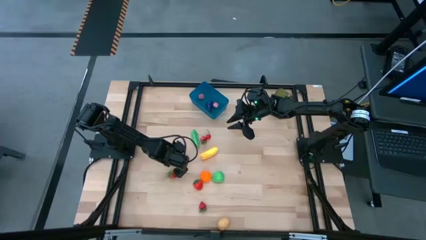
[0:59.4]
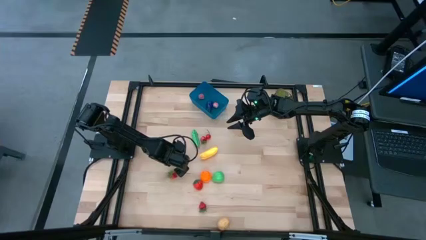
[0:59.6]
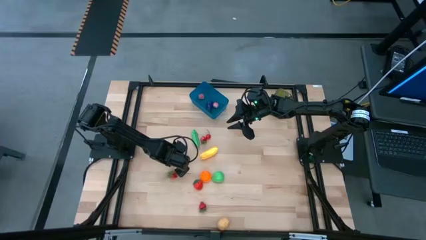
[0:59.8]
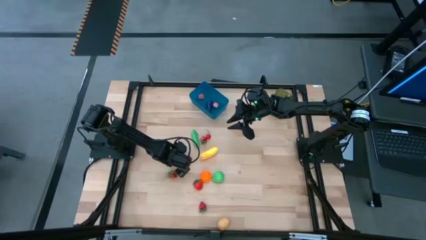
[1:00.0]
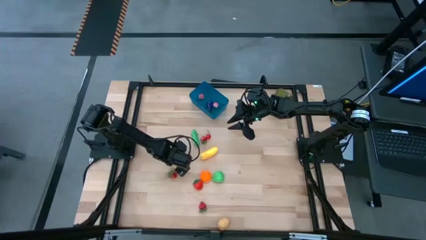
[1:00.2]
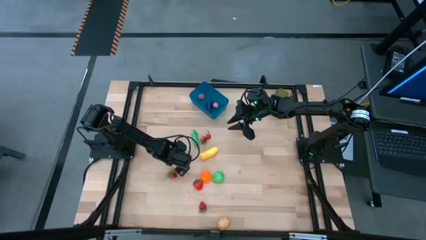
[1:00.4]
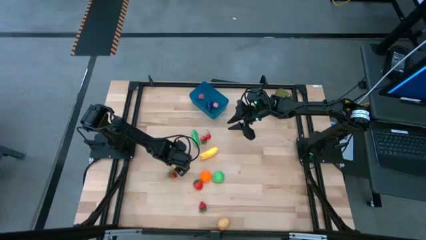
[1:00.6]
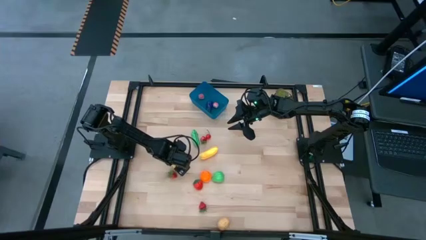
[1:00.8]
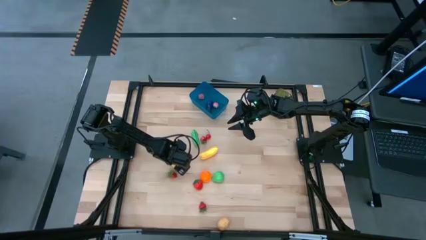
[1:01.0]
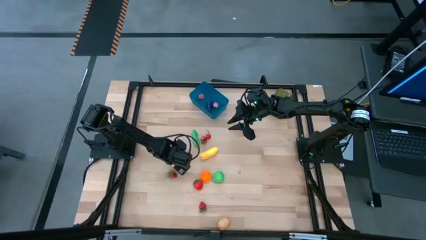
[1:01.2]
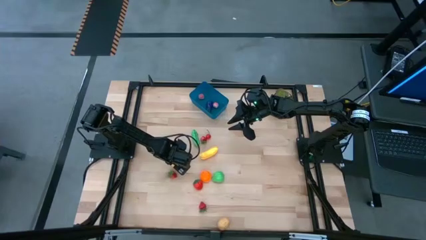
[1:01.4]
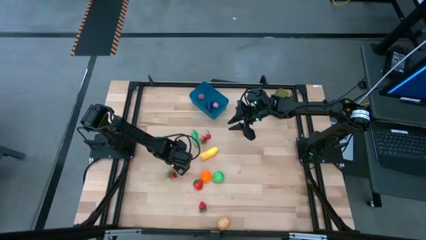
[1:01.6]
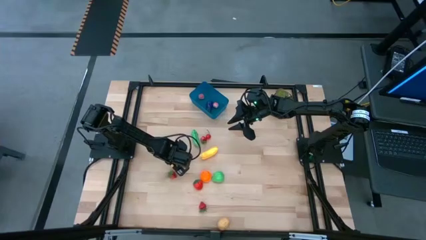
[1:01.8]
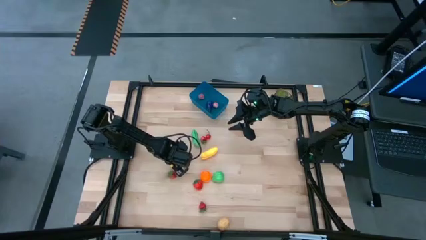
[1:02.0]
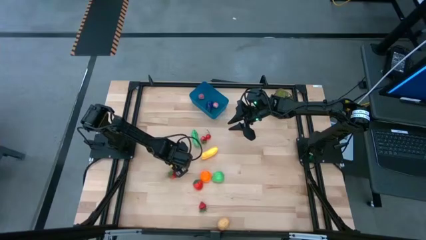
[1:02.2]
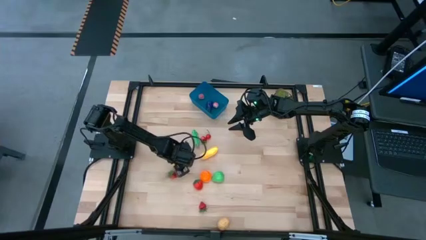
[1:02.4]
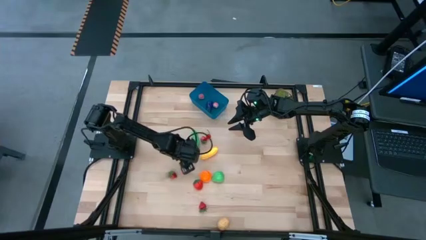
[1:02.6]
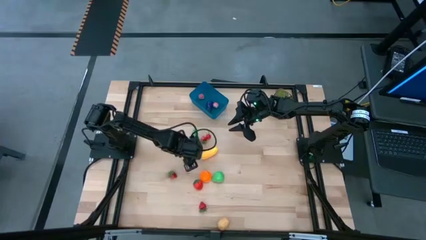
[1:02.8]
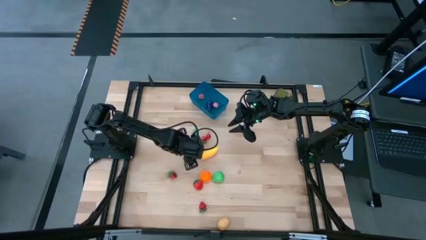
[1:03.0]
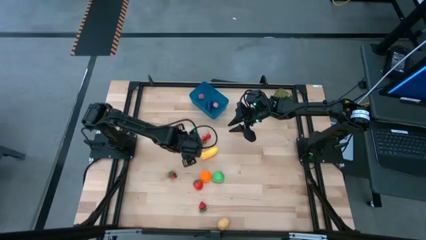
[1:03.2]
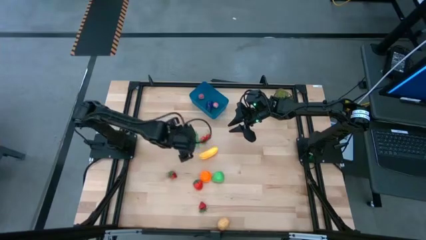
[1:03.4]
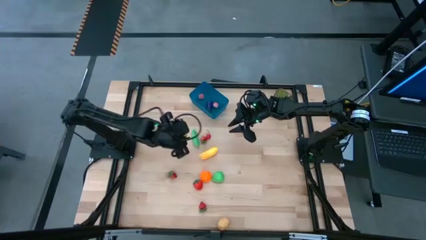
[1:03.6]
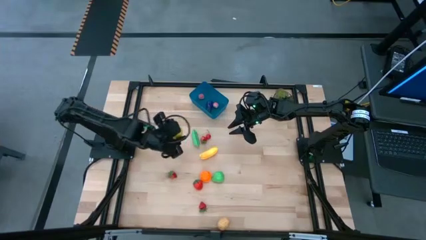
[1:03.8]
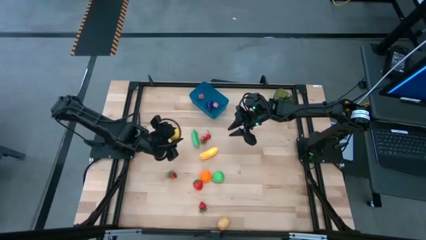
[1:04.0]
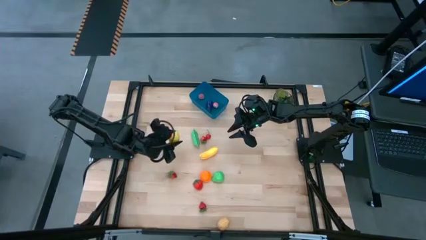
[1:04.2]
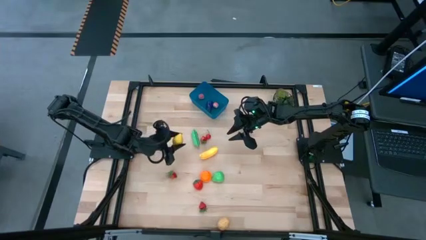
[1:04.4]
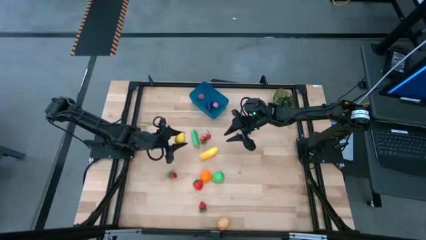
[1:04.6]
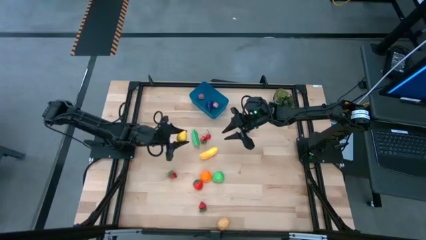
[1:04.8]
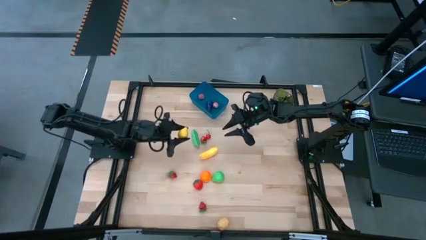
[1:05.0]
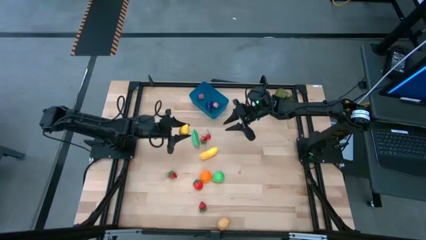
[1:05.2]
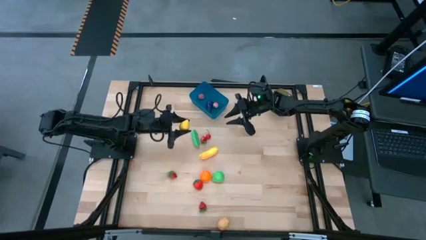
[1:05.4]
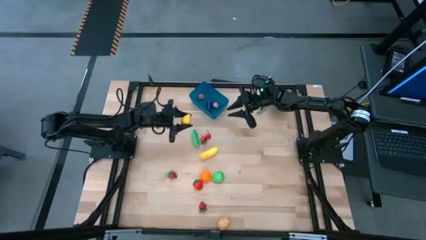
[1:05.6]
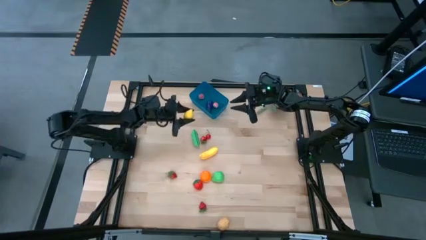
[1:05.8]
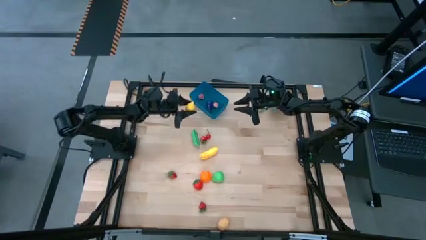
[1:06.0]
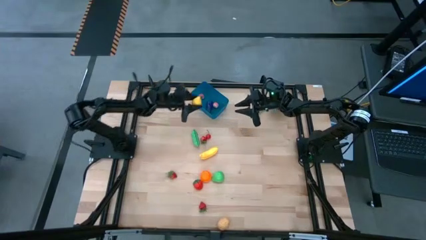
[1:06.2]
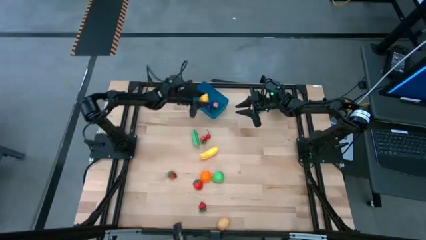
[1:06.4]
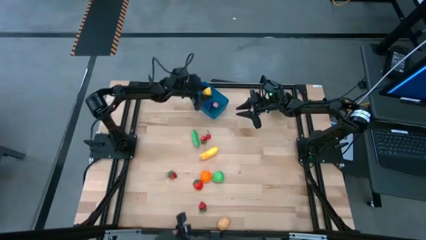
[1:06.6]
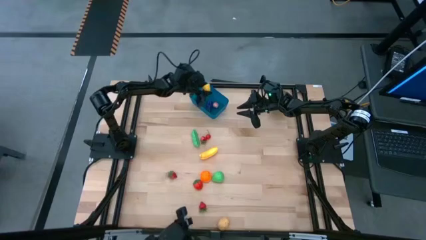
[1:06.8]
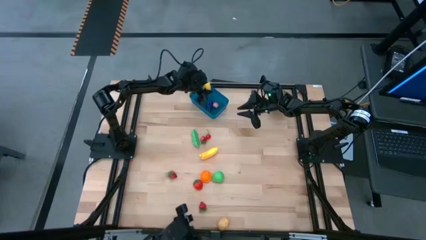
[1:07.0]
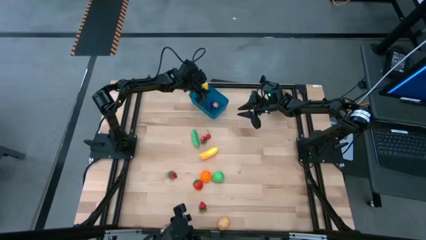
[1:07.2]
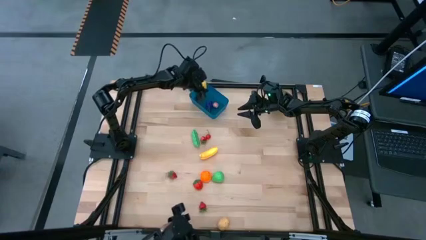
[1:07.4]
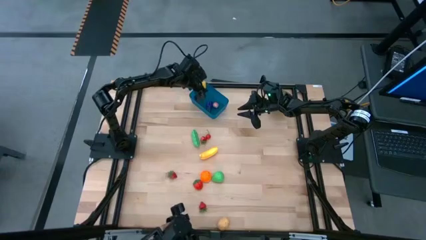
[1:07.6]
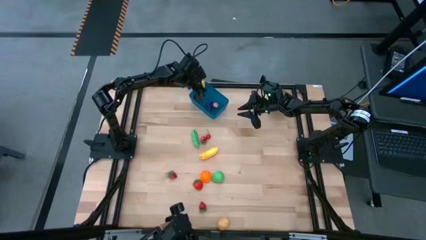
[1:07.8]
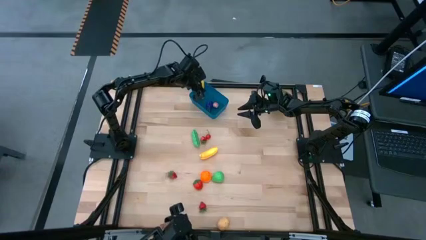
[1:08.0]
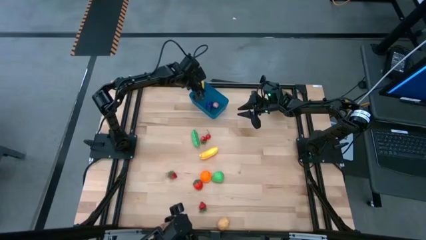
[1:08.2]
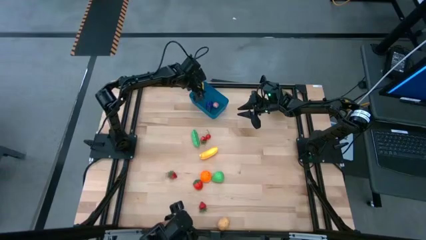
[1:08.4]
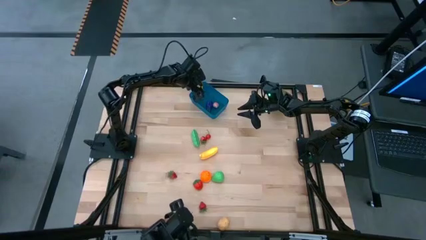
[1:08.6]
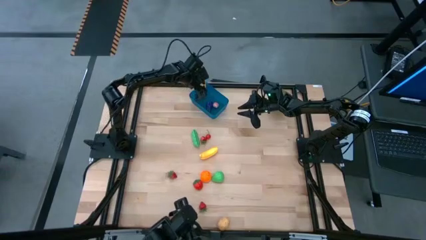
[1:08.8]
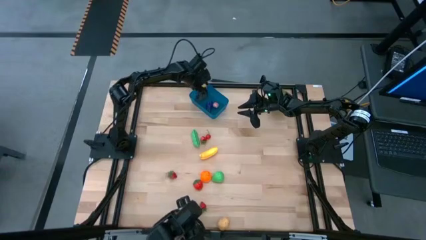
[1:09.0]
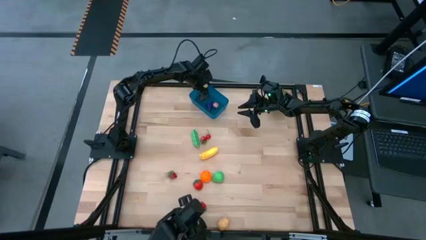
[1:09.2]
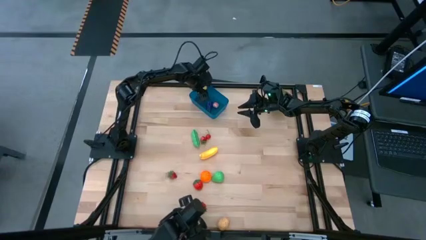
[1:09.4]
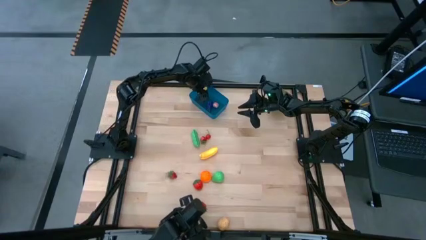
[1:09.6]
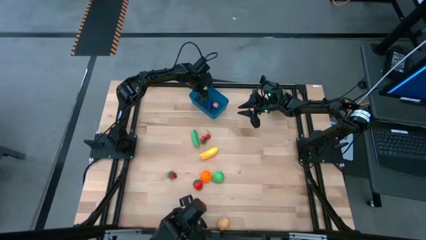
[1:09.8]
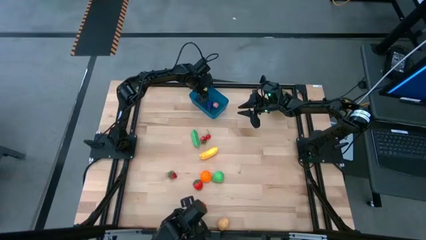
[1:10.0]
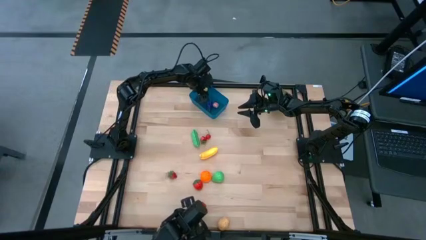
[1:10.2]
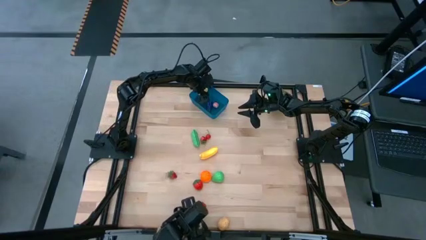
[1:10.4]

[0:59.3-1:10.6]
Task: Pick and placing Produce into tupperware
Put the yellow lemon into the blue bin

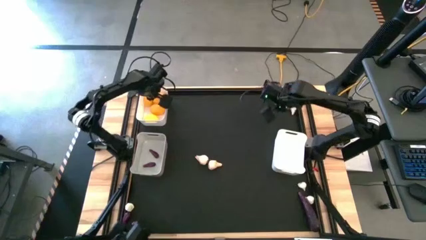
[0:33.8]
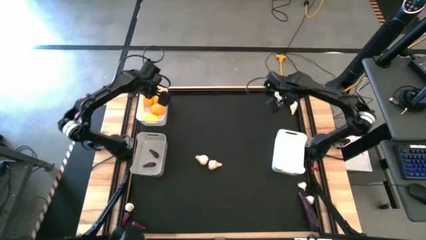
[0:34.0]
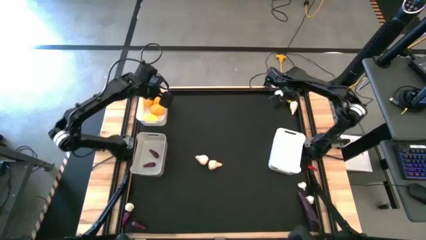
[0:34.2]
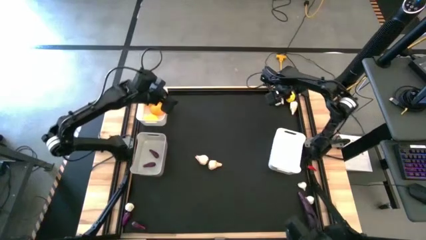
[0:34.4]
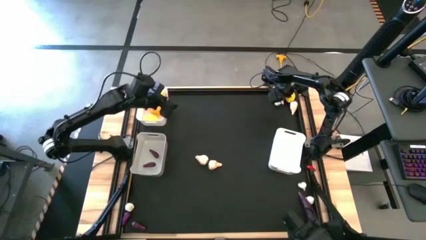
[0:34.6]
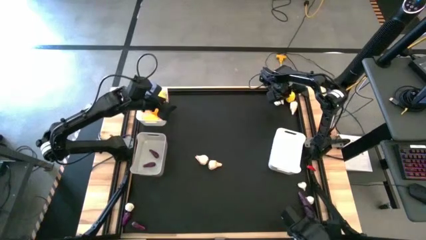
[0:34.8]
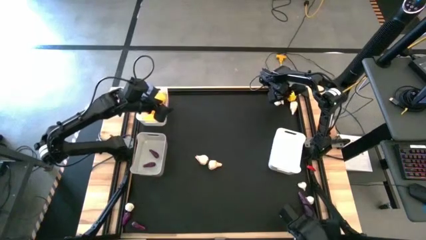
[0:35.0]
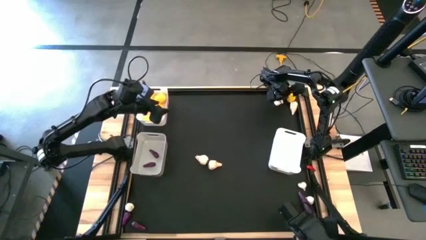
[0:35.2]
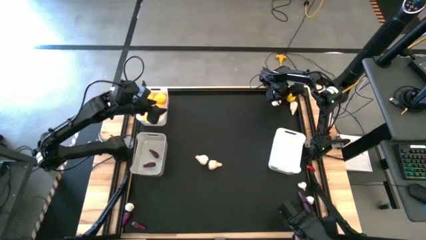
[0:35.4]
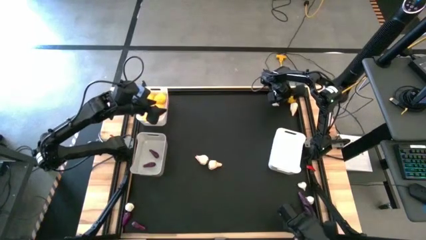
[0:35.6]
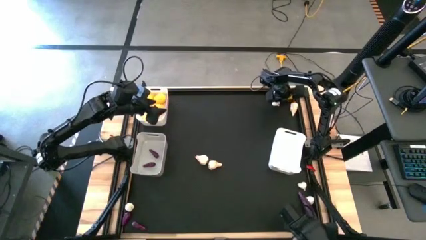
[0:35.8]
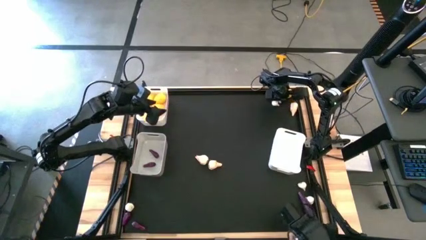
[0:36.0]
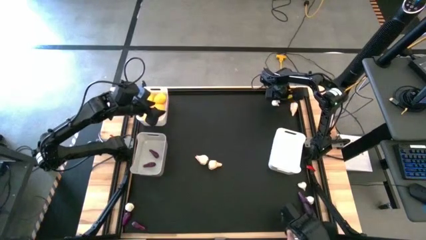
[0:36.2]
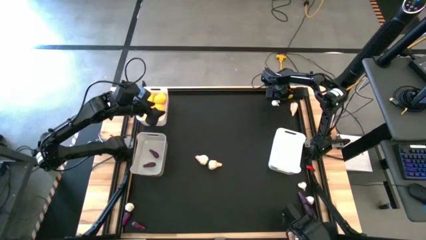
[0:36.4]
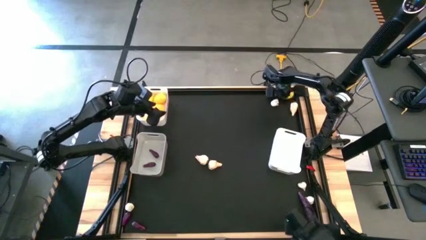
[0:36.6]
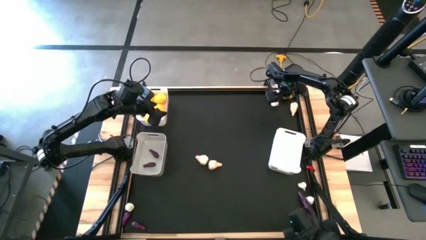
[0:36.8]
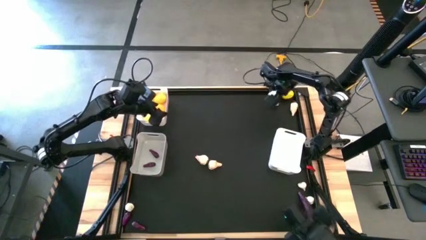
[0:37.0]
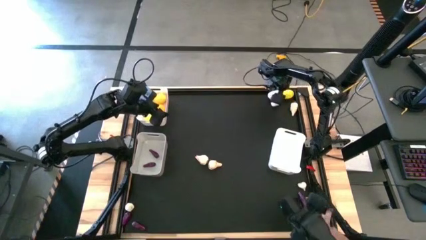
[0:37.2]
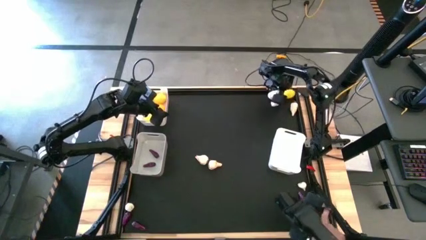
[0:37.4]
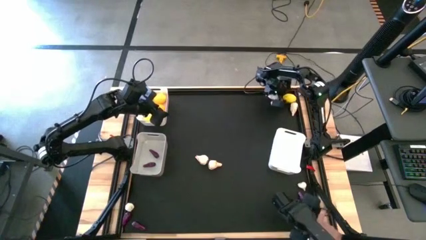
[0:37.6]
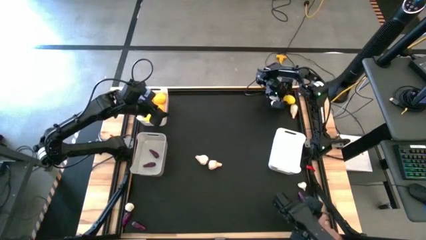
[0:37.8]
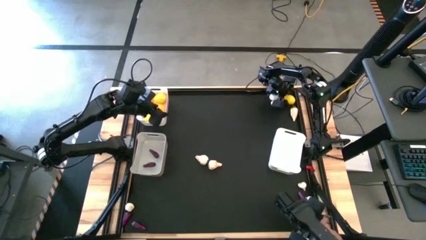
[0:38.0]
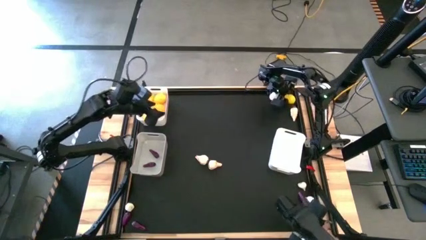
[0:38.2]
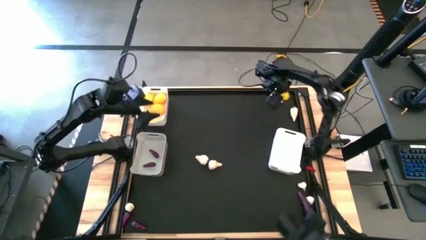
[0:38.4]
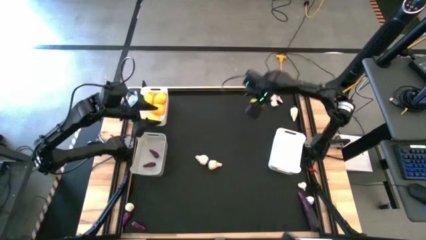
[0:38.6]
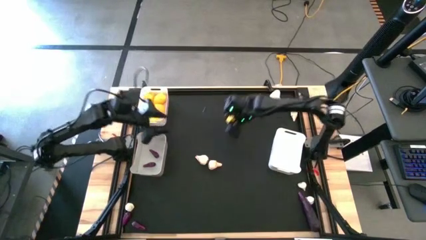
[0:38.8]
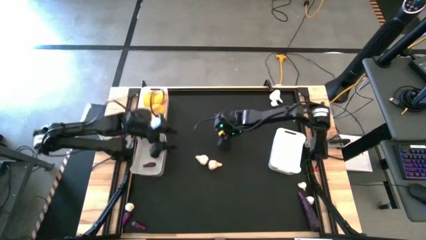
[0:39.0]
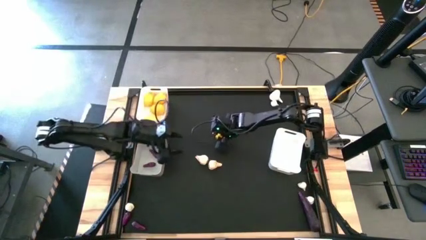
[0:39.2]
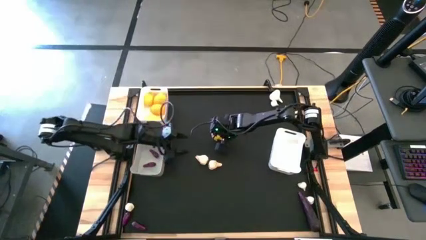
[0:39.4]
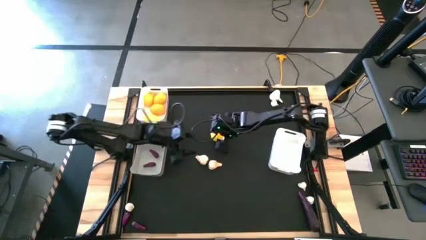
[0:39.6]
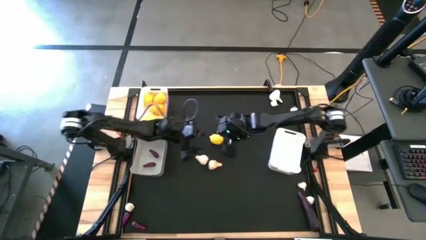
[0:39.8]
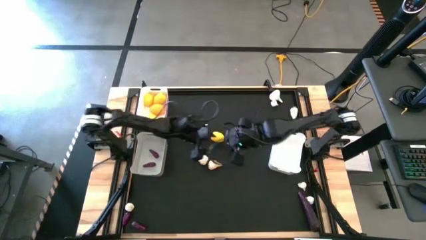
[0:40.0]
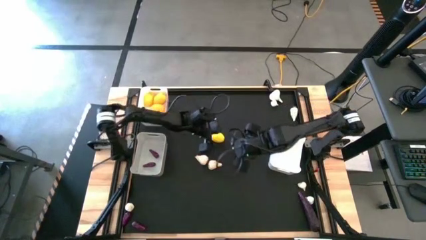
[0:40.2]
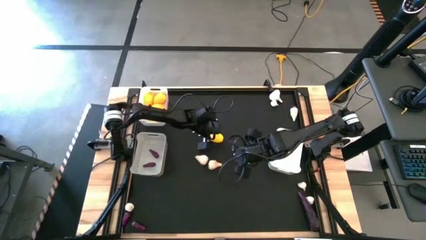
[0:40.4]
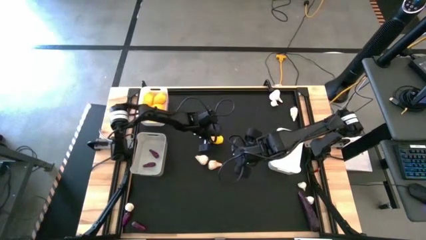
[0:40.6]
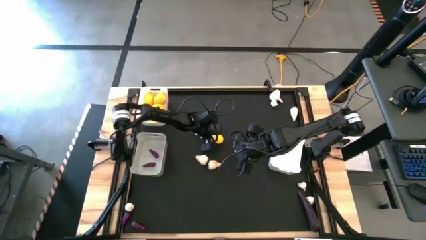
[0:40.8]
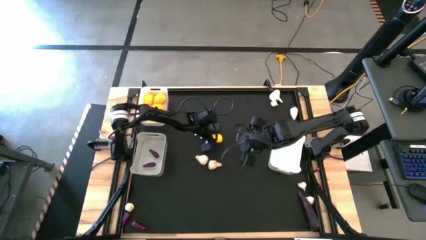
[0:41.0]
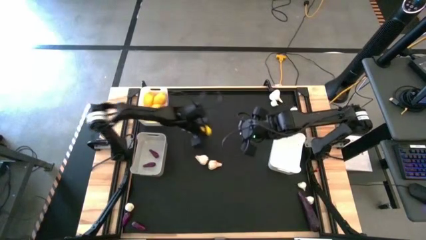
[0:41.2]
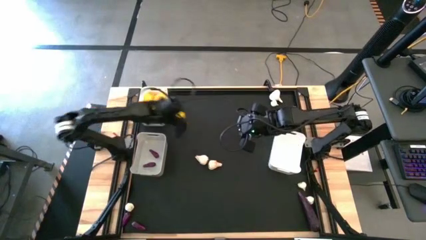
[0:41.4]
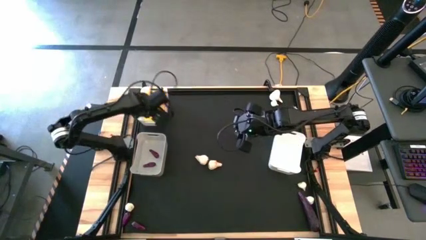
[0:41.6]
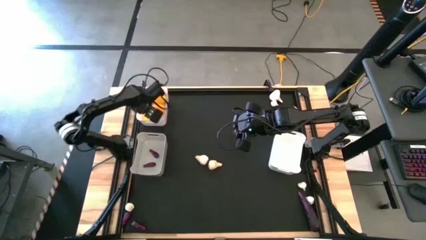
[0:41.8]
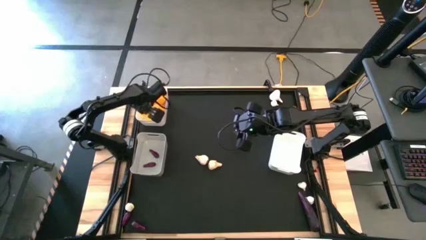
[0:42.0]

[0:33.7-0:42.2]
Task: Sort produce into baskets
Put the yellow lemon into the top white bin
